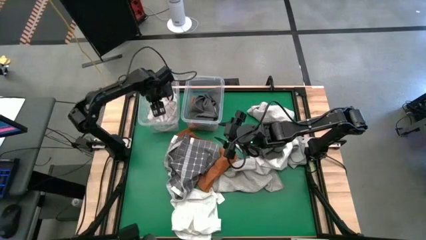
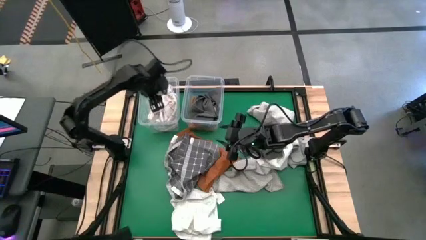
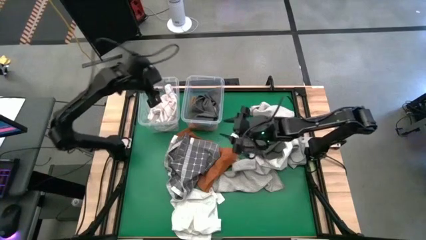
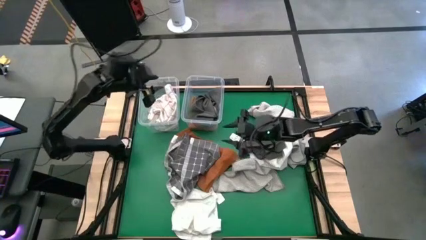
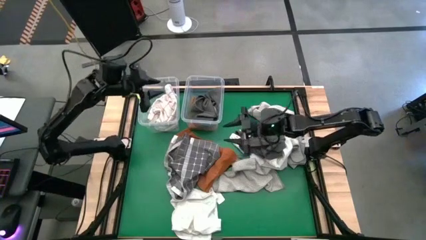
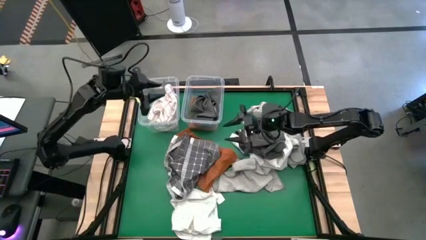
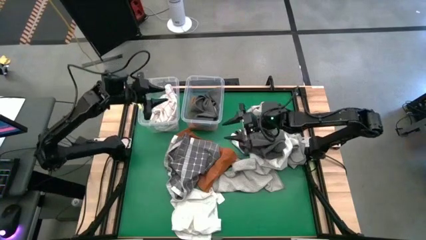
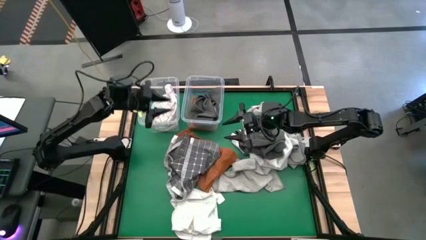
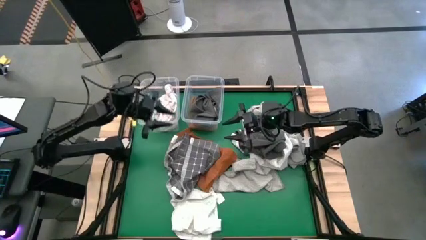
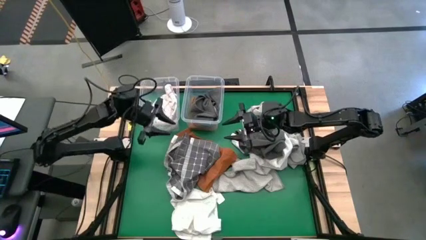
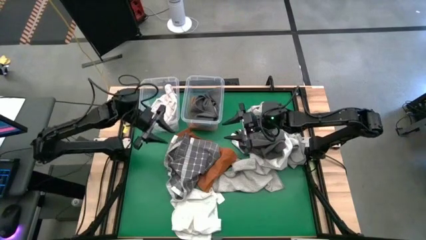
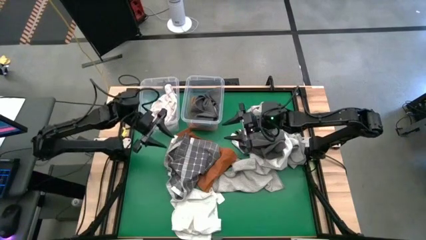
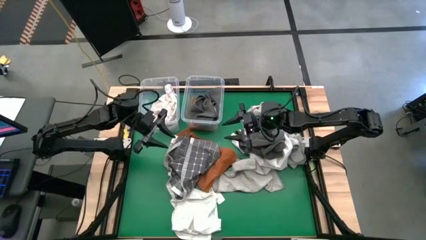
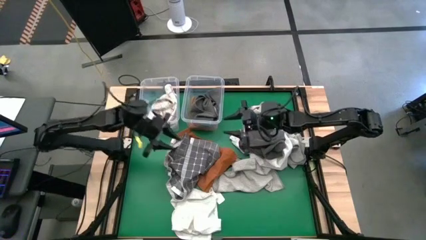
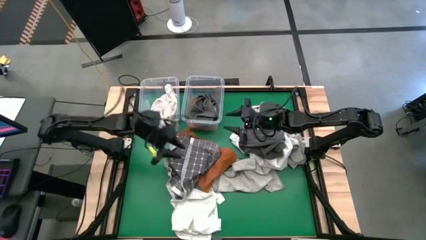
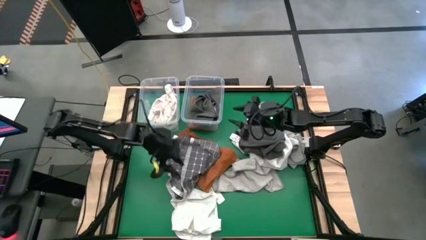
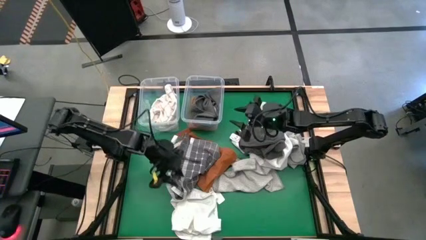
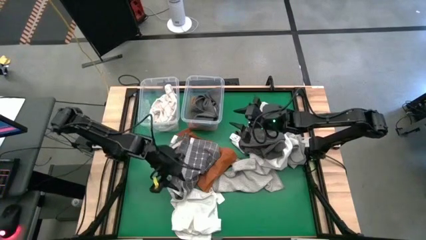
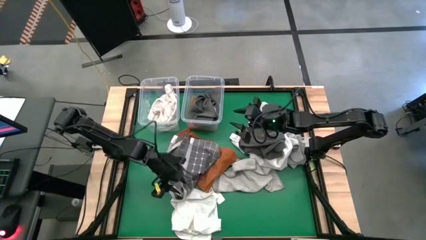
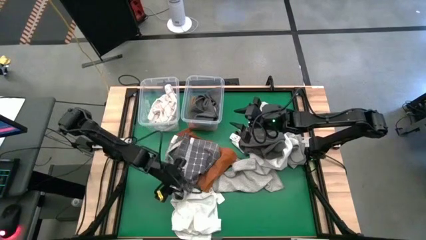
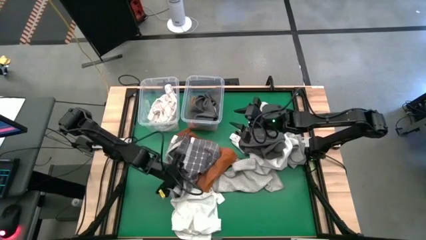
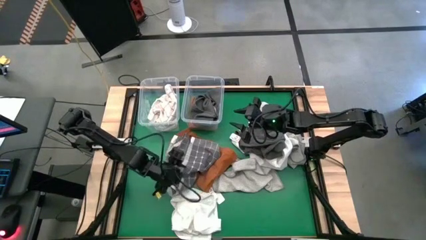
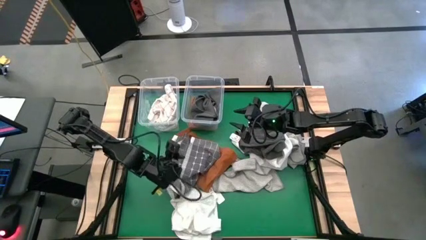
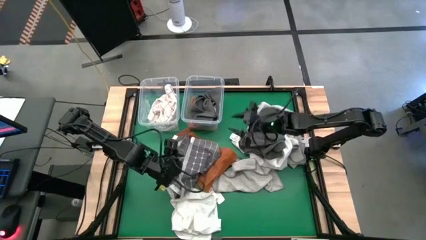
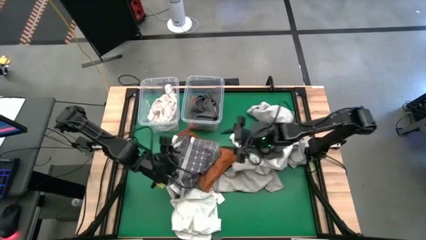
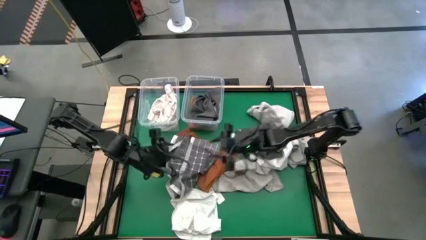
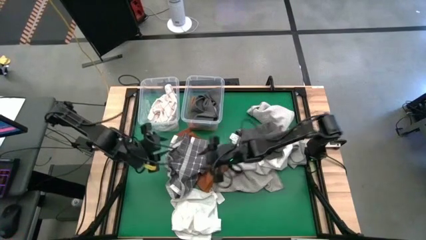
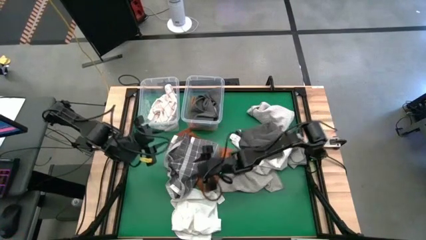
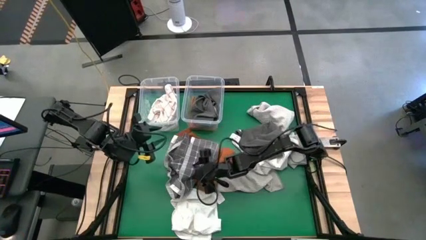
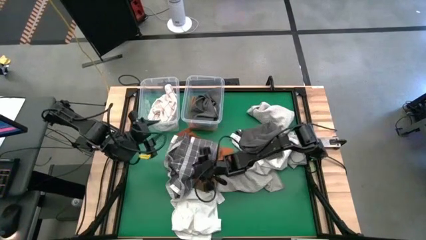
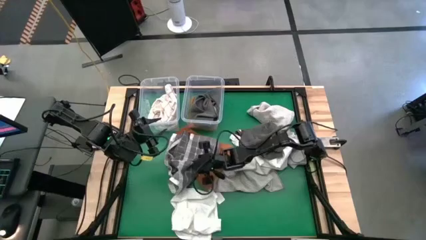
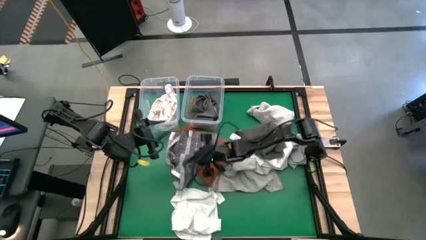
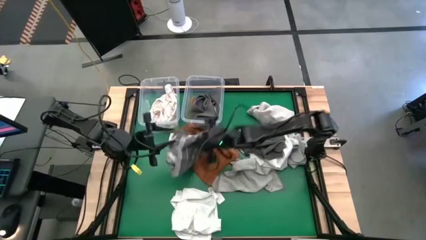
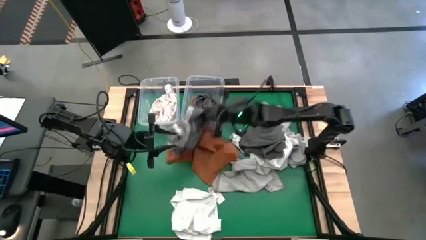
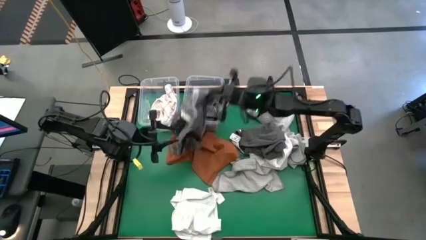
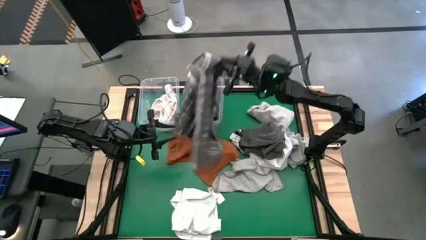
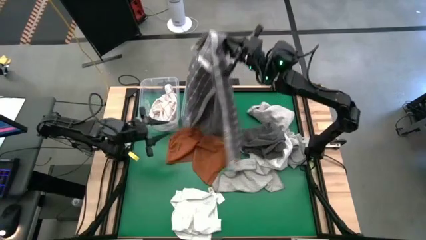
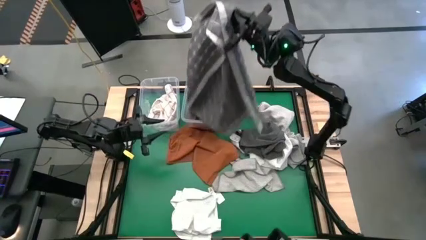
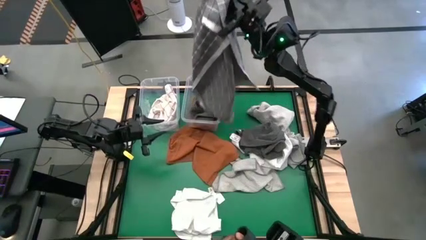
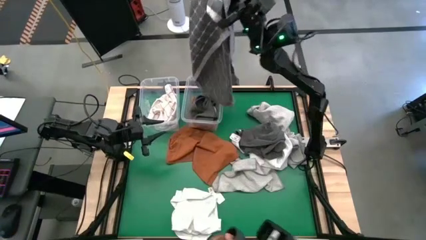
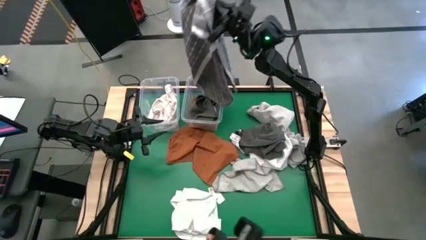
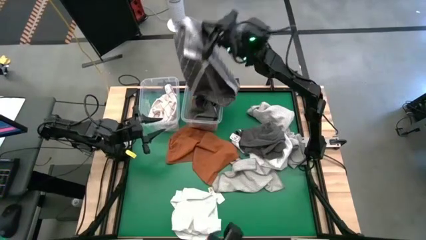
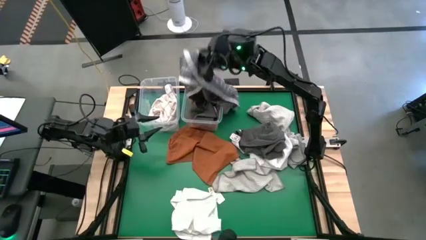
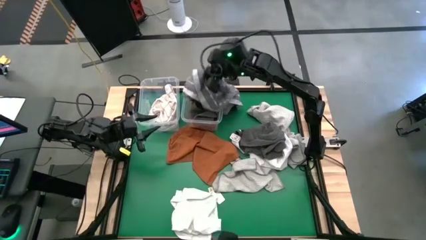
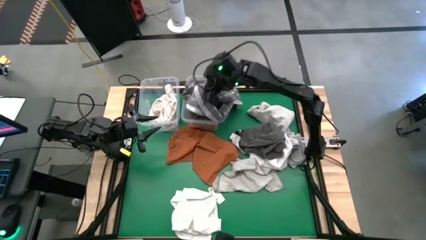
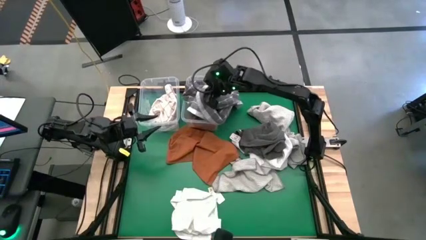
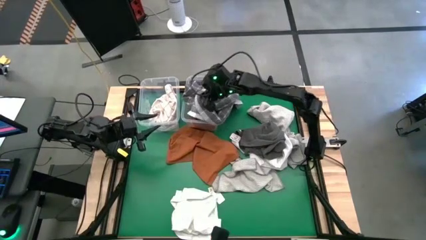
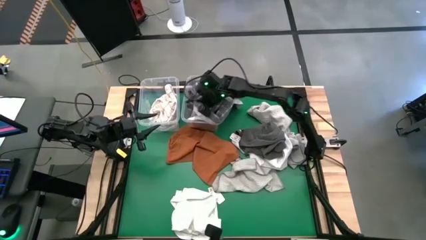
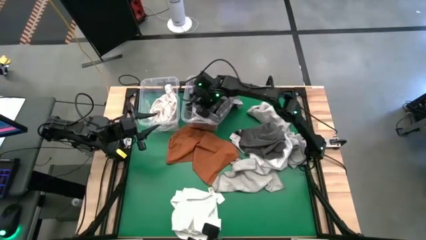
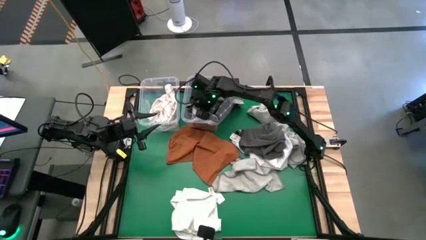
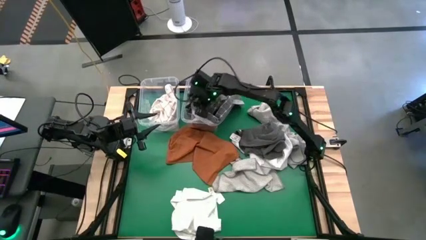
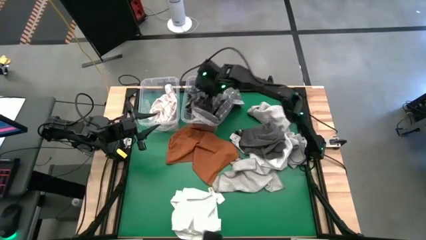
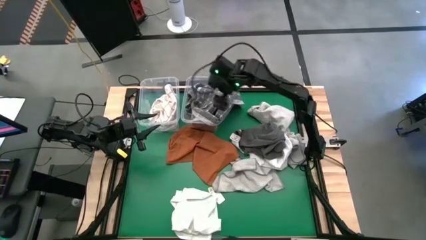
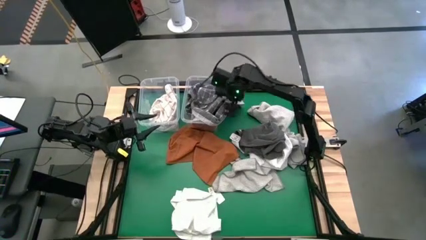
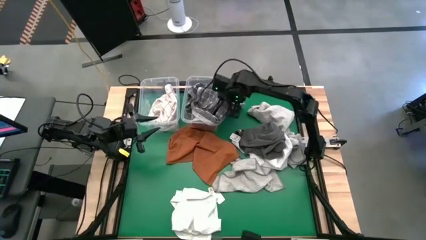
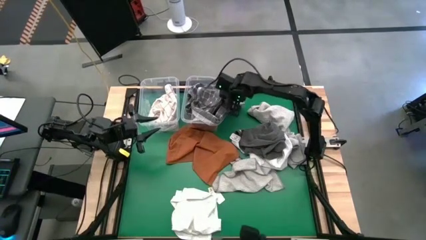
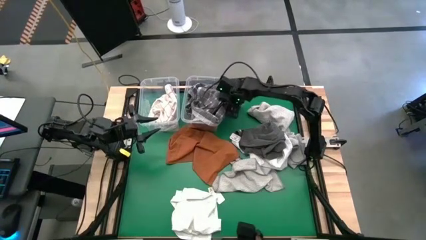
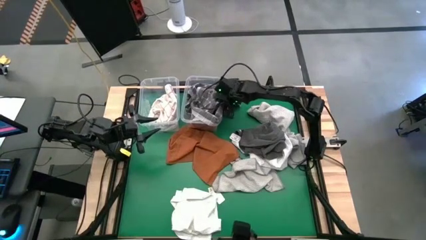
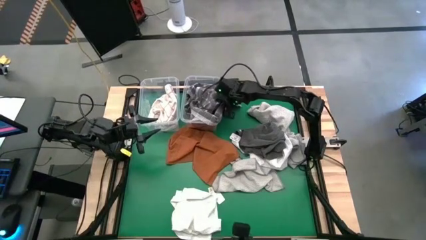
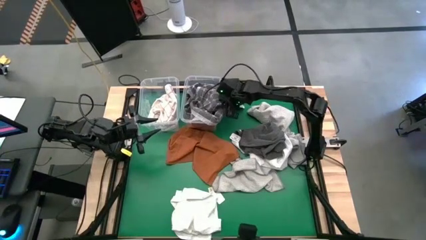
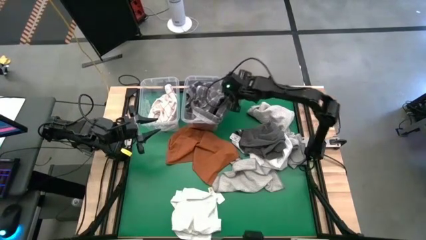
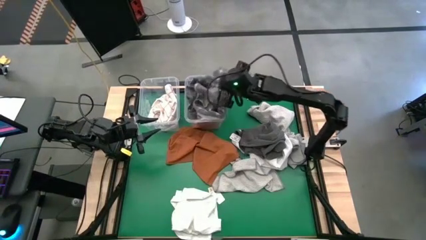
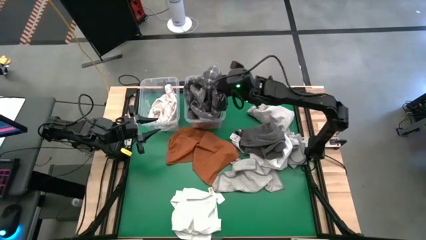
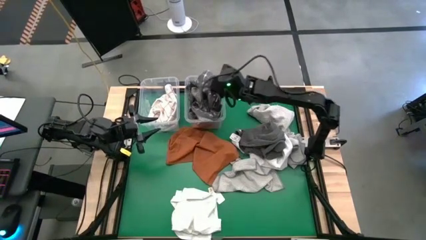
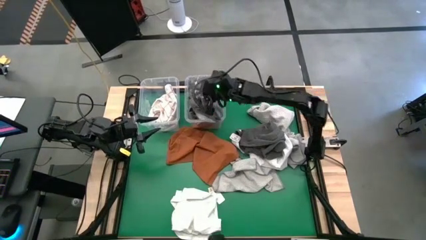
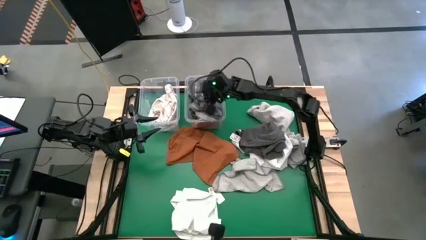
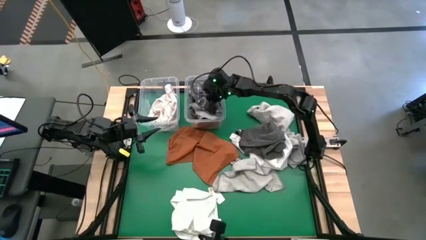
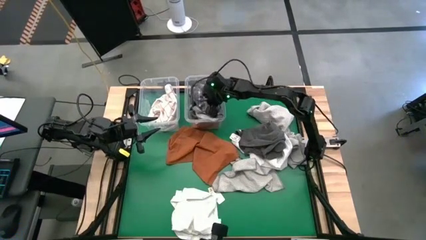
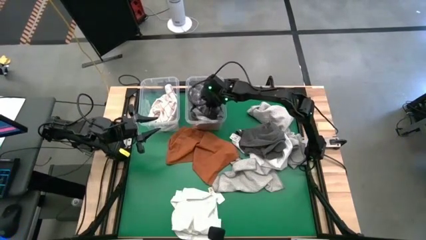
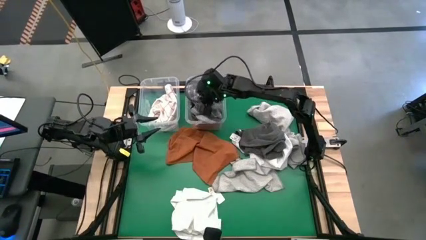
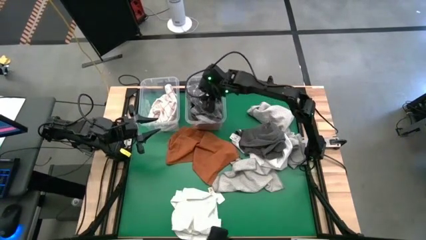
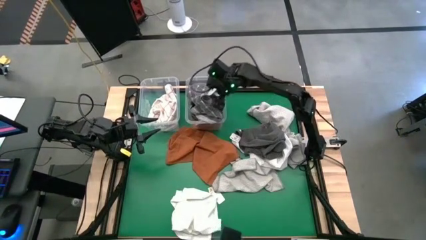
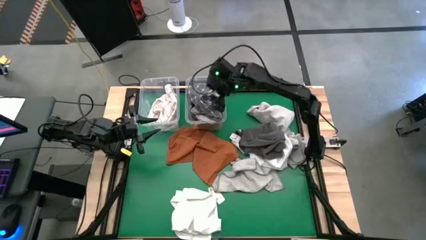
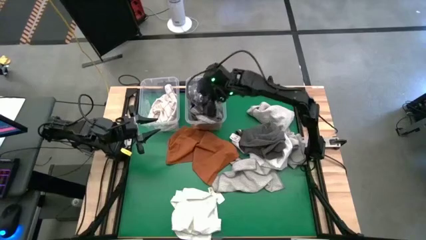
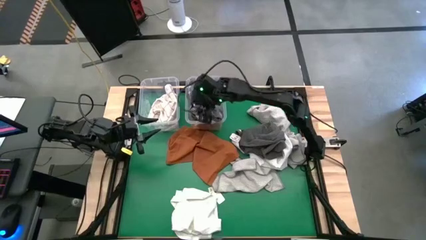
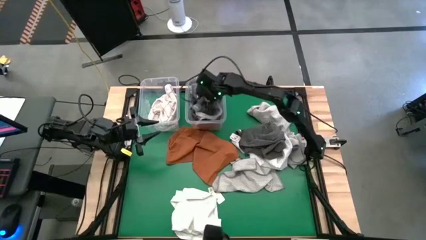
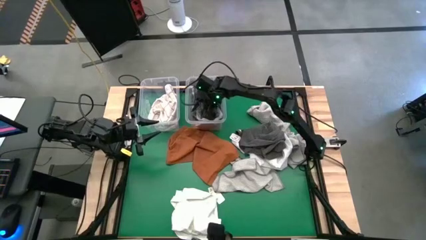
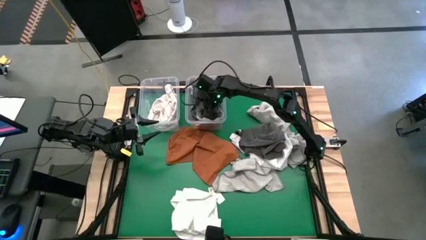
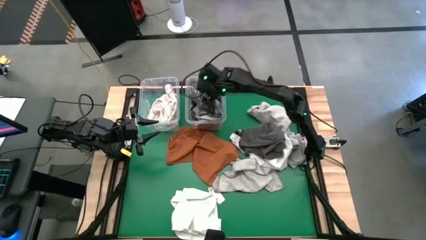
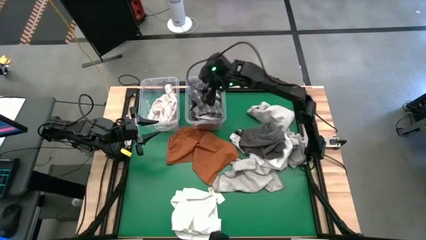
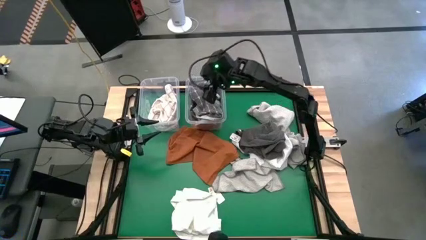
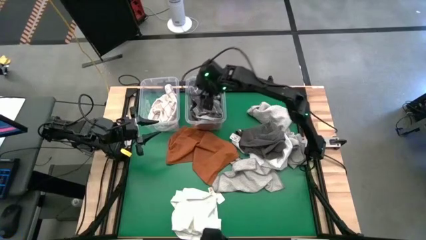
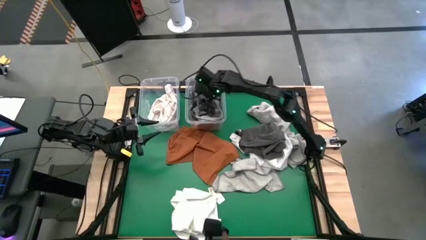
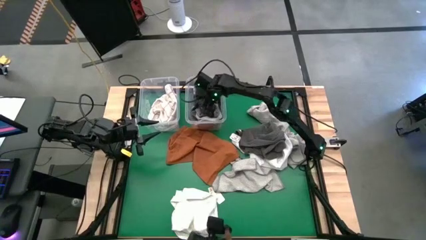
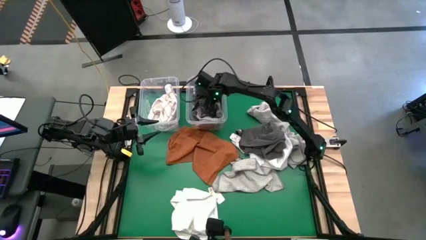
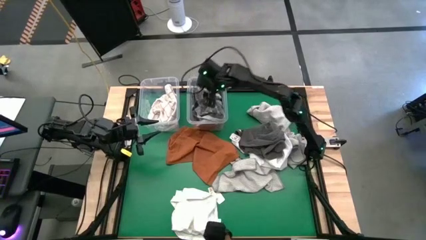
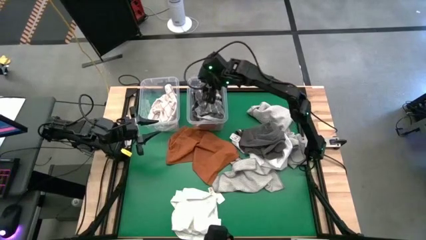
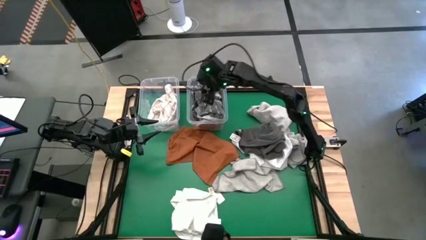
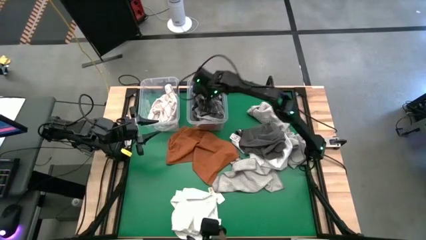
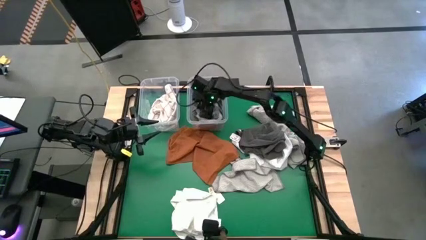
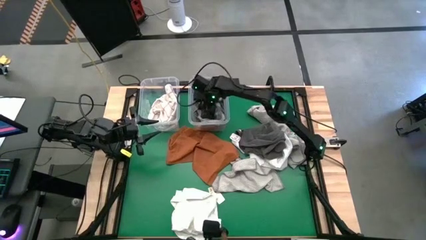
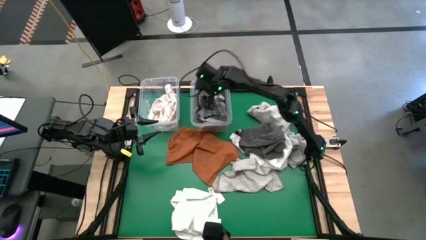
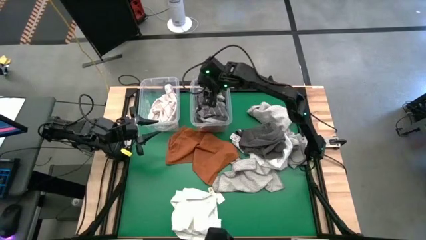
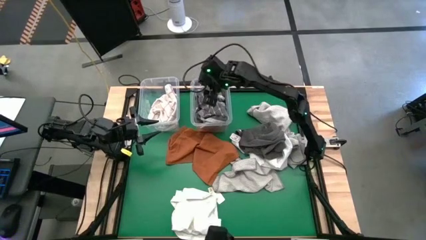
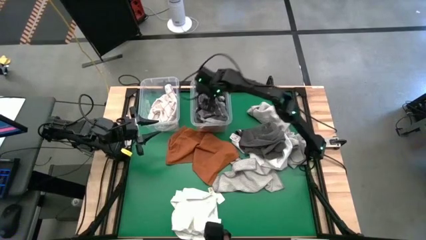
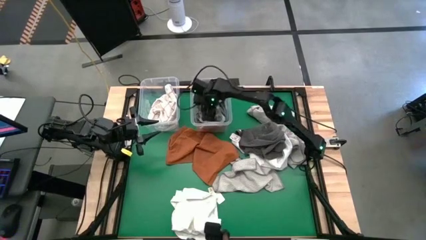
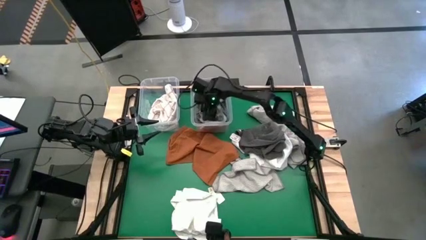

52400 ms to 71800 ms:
Task: Sort towels by color in basket
Put the dark gray patterned towel into the right transparent bin
